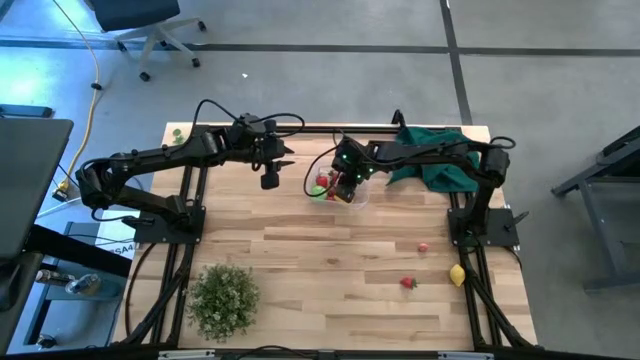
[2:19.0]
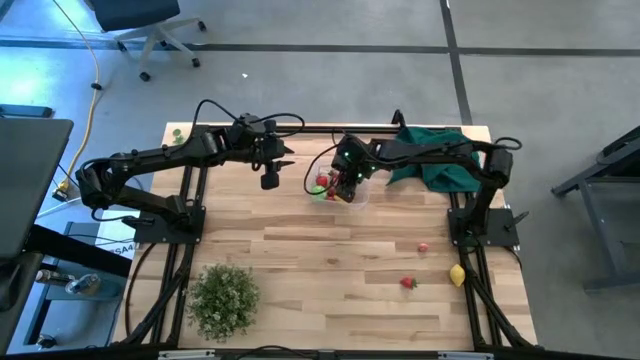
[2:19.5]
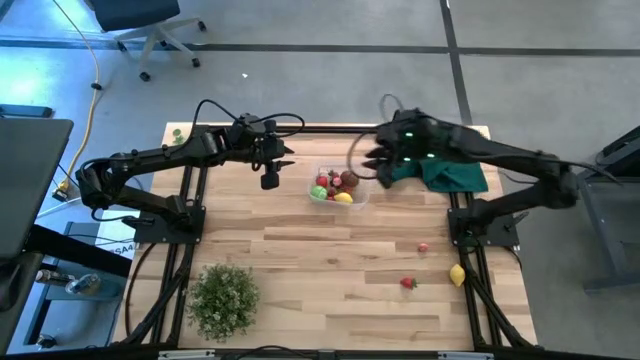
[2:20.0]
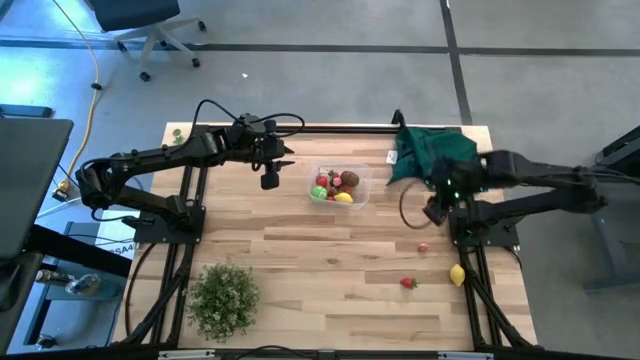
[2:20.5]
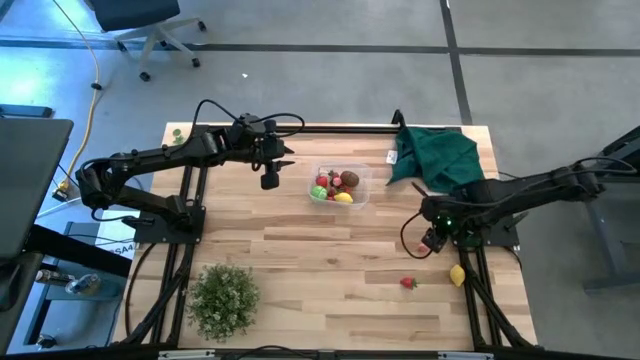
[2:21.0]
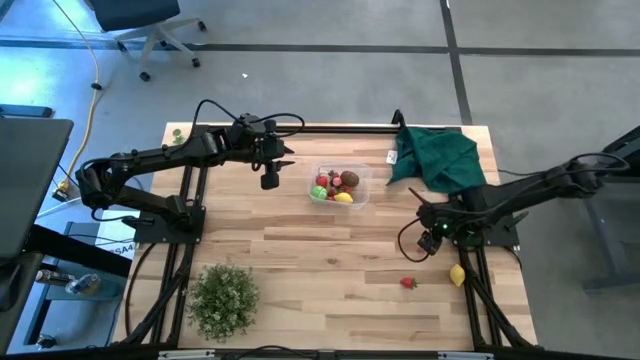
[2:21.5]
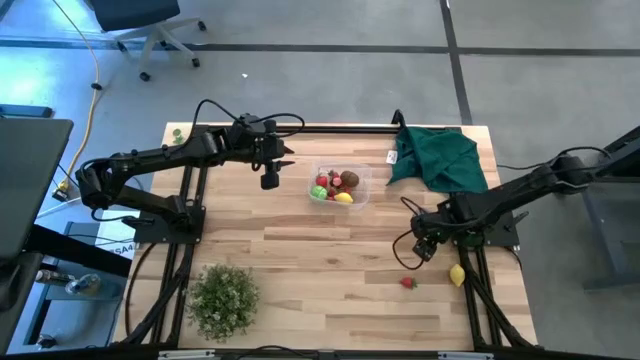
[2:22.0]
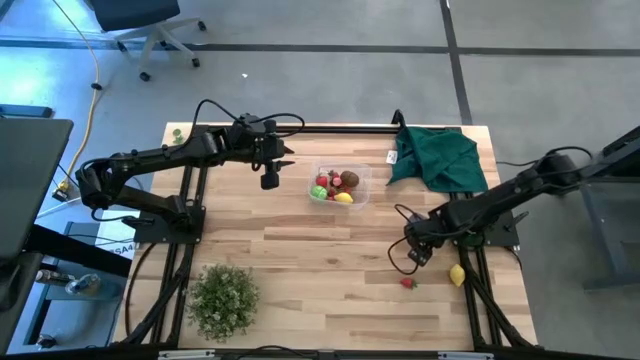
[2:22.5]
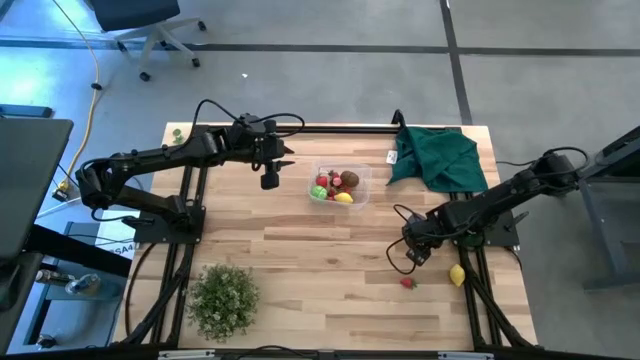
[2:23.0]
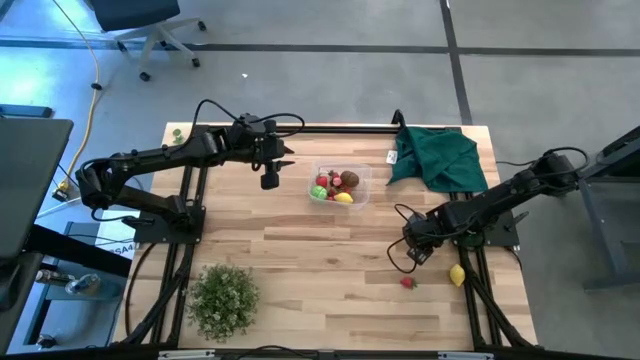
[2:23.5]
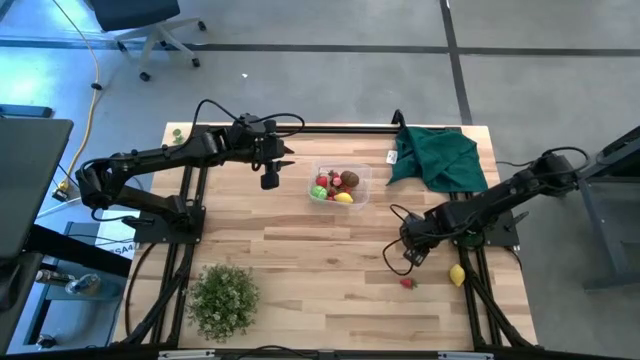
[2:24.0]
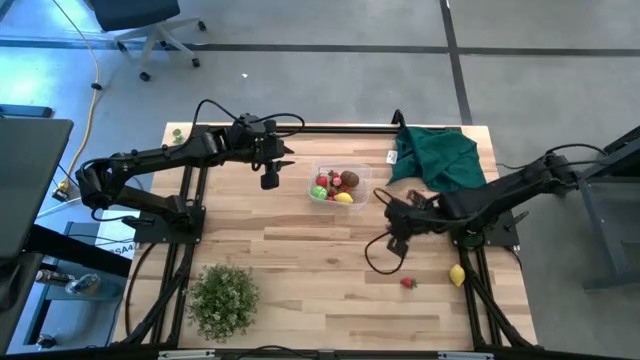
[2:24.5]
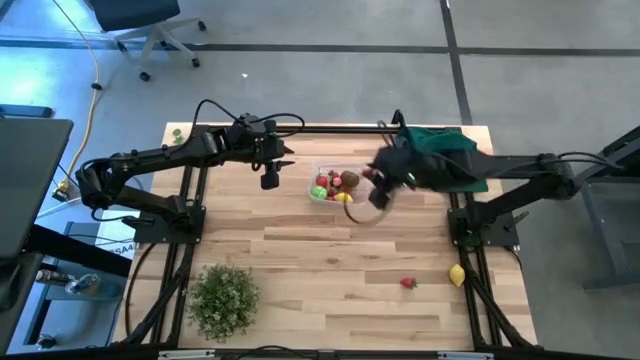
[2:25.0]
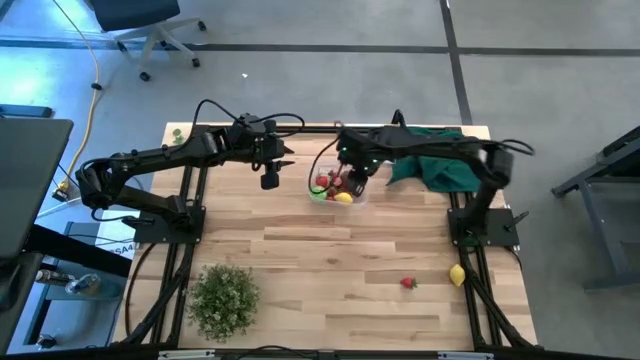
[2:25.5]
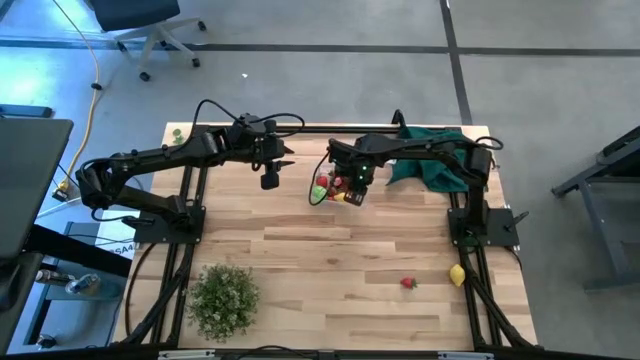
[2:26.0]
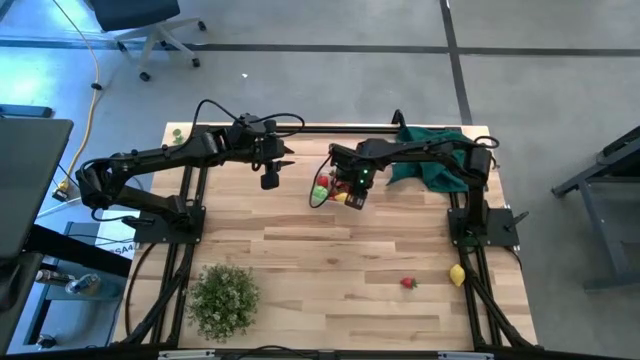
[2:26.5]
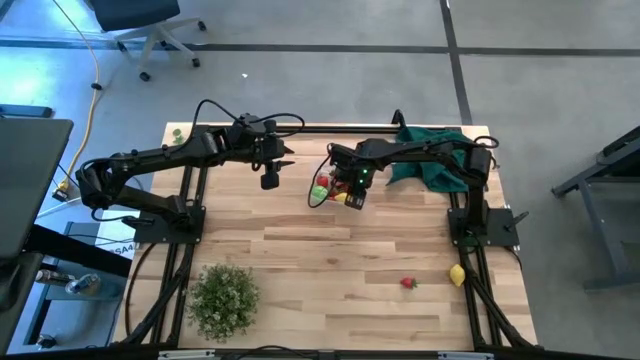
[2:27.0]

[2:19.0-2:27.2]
Task: Pick and placing Produce into tupperware
Put the pink peach into the transparent bin

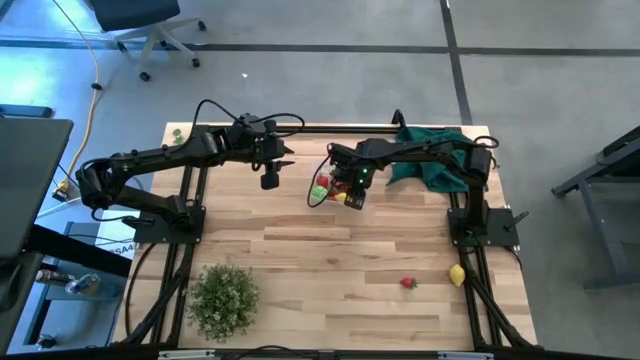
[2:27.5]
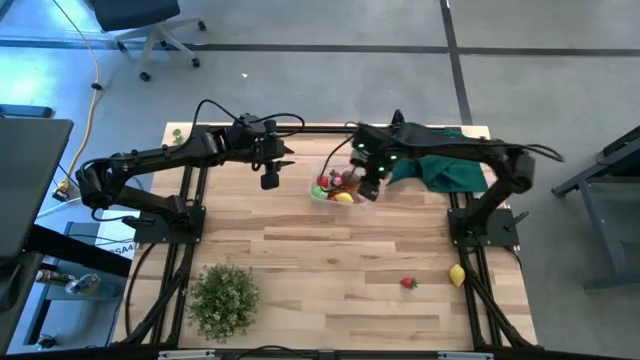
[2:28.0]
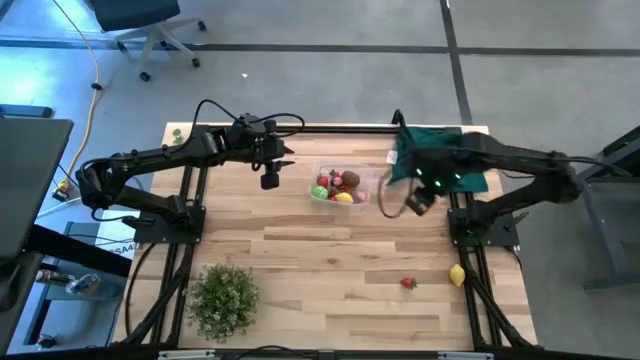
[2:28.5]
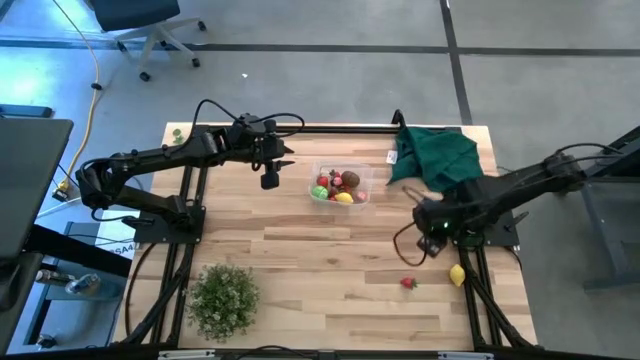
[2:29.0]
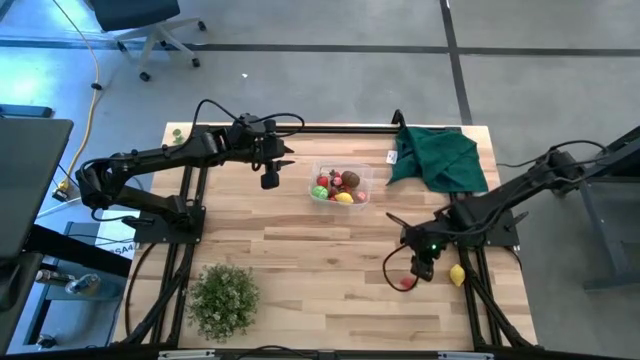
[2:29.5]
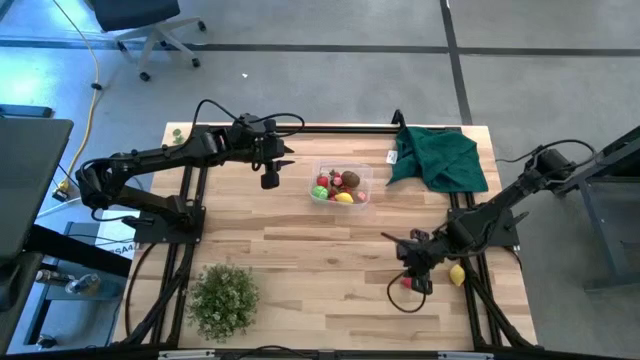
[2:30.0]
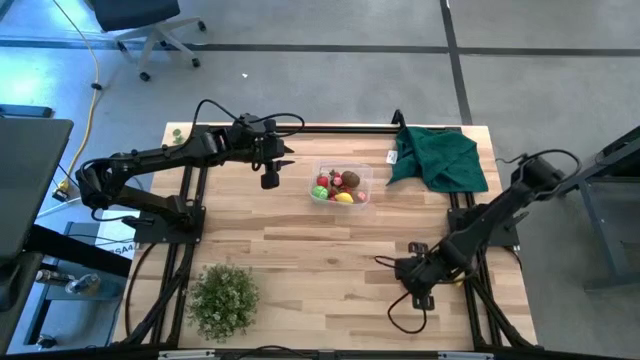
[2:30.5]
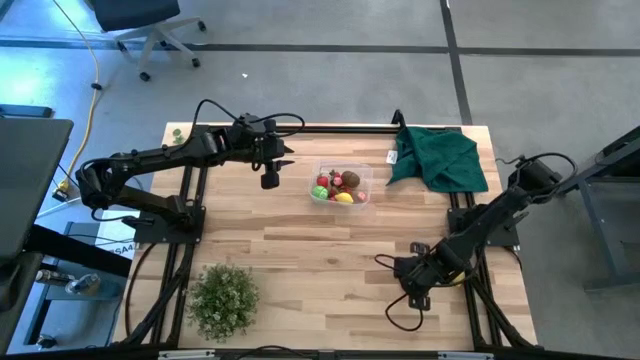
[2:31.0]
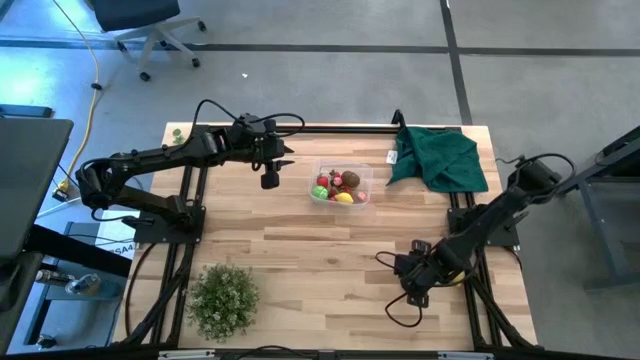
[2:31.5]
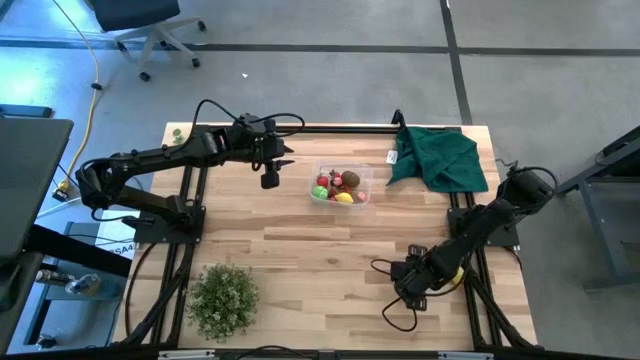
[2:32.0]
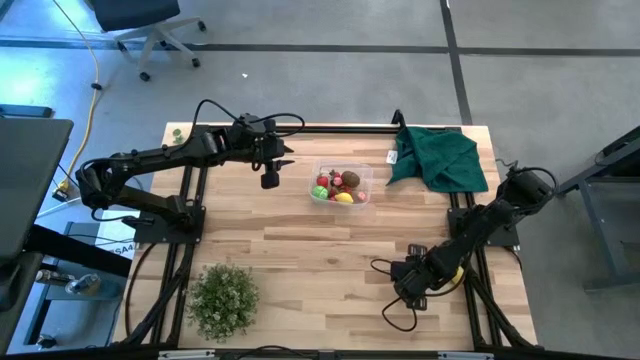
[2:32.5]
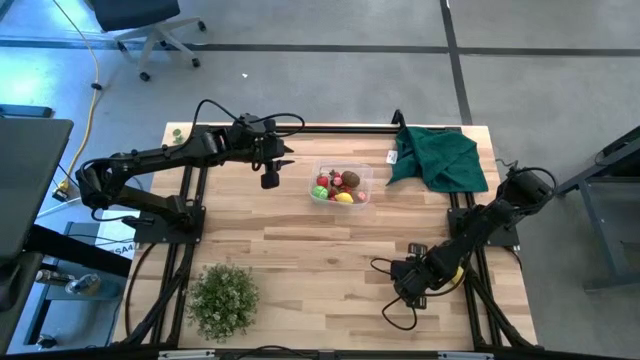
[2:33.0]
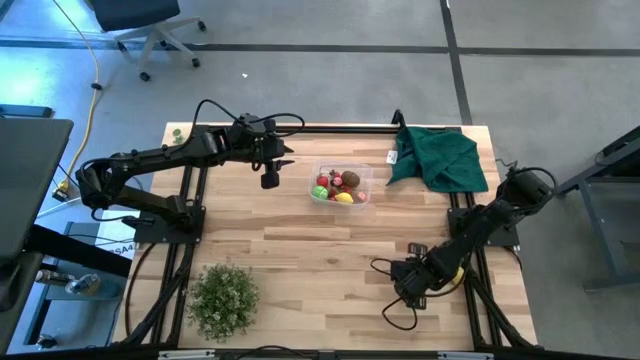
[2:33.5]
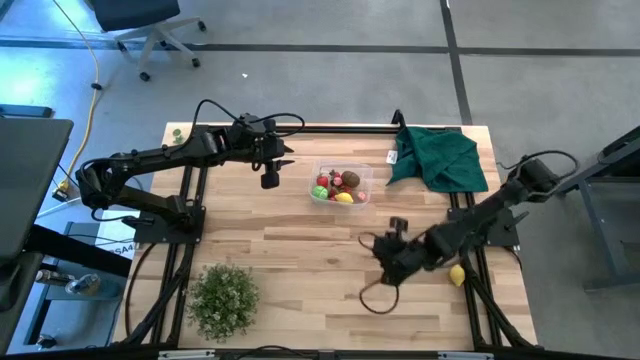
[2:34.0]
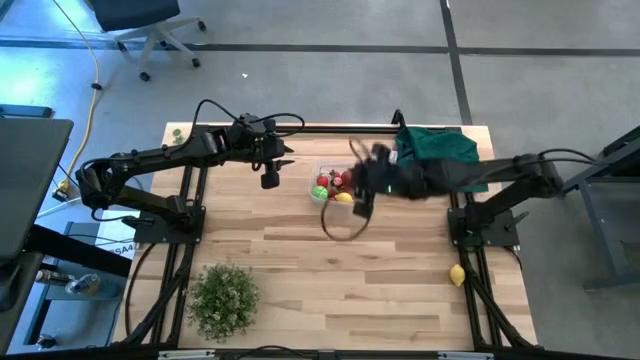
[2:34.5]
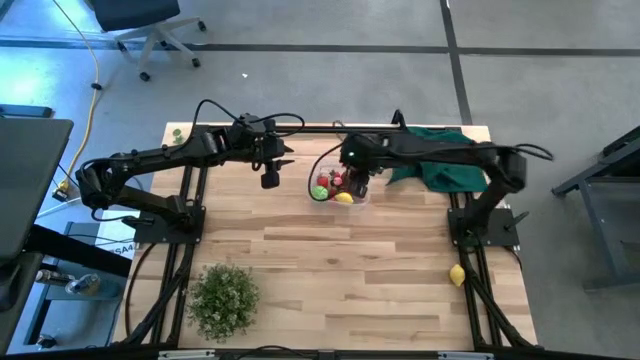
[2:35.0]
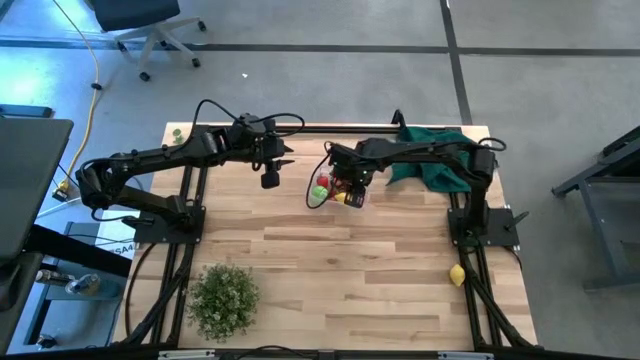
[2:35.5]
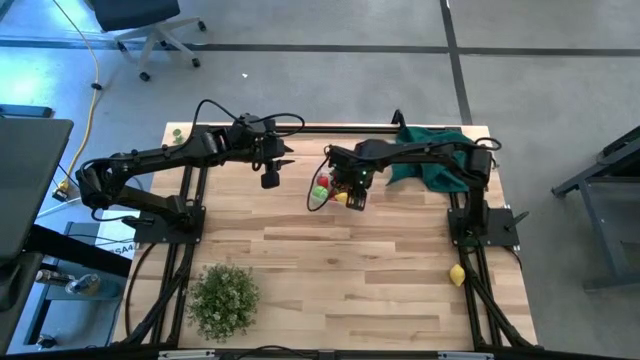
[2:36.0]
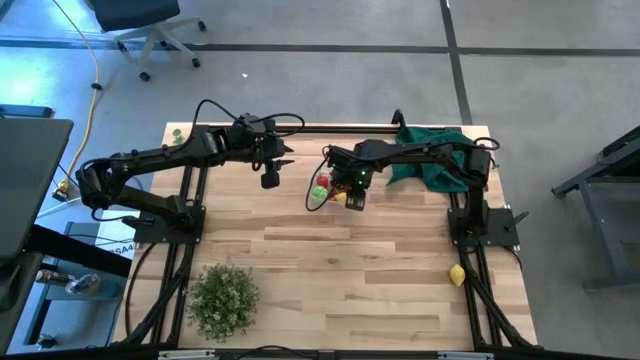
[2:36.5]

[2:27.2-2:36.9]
Put the red strawberry into the transparent bin

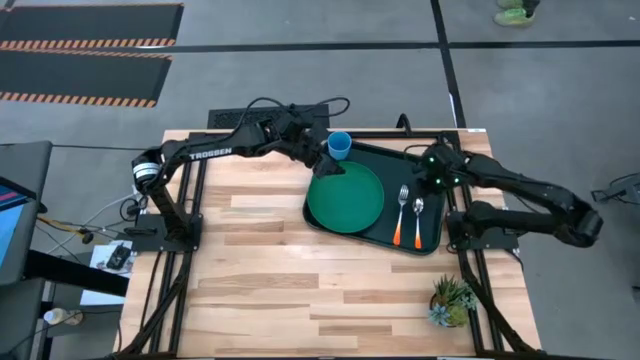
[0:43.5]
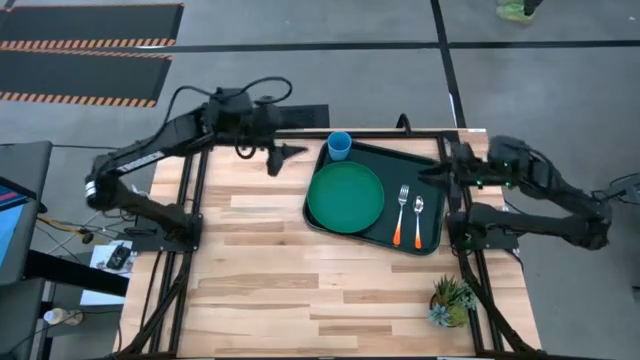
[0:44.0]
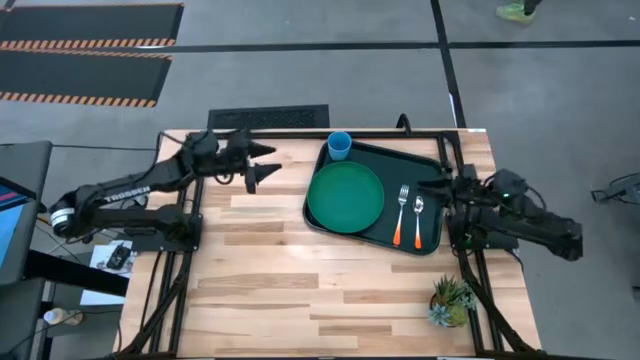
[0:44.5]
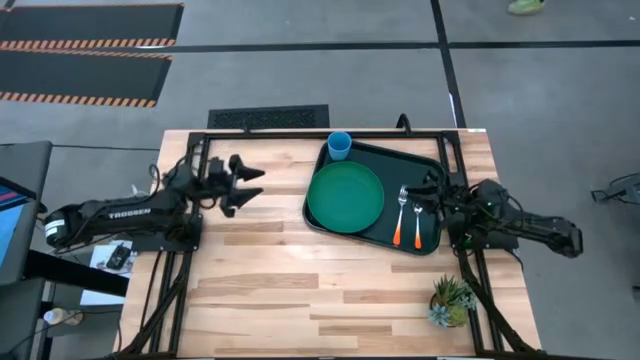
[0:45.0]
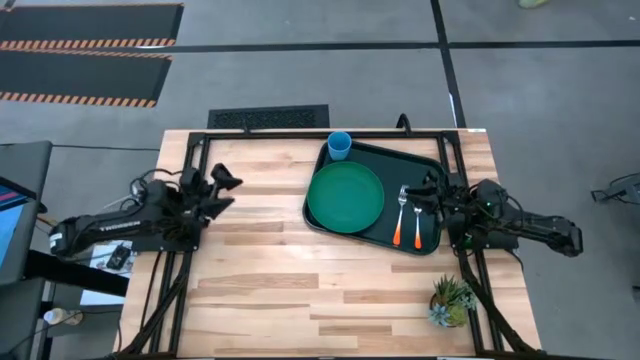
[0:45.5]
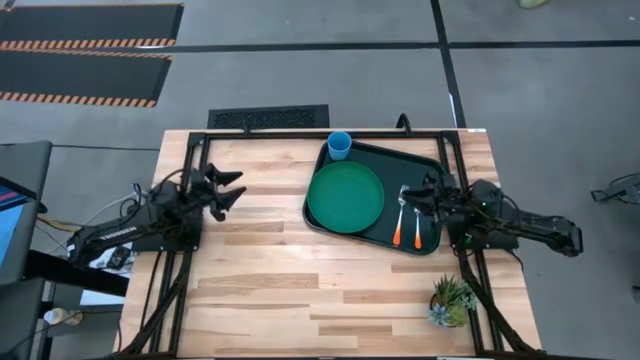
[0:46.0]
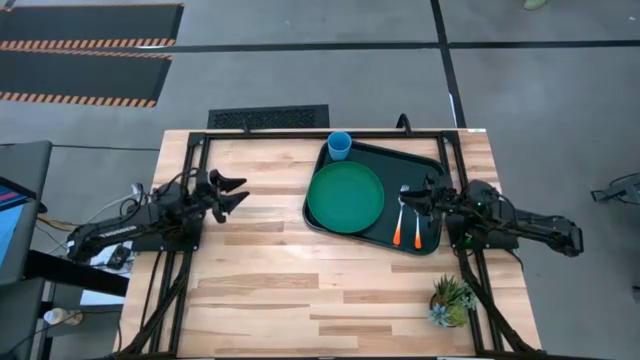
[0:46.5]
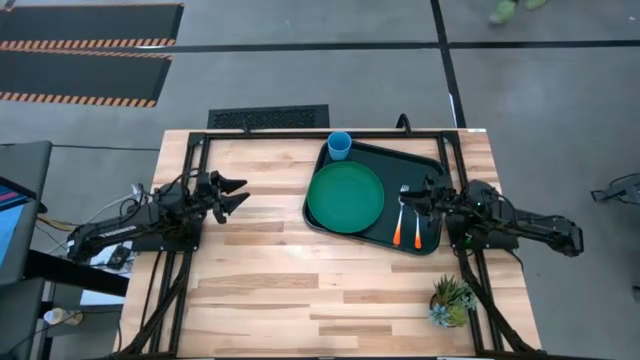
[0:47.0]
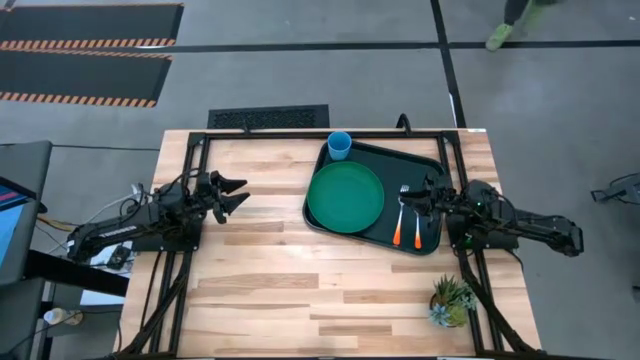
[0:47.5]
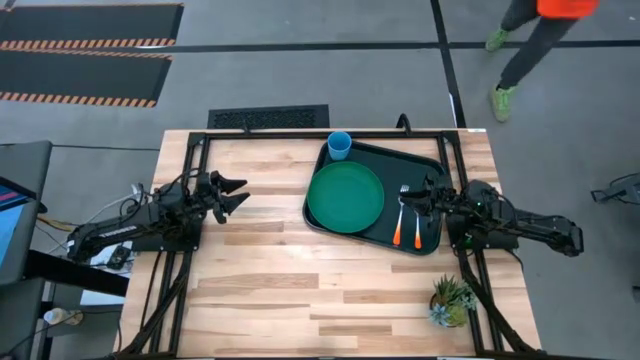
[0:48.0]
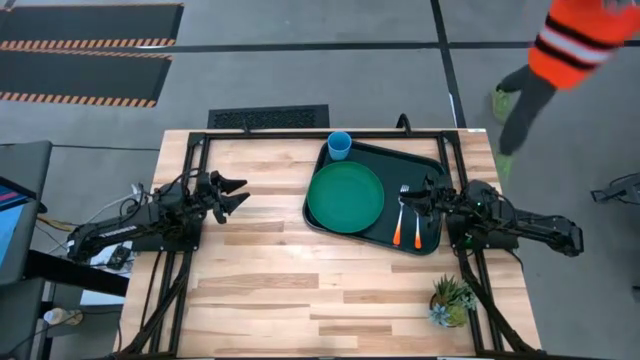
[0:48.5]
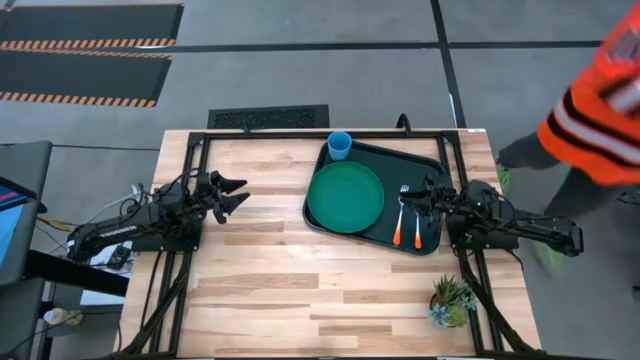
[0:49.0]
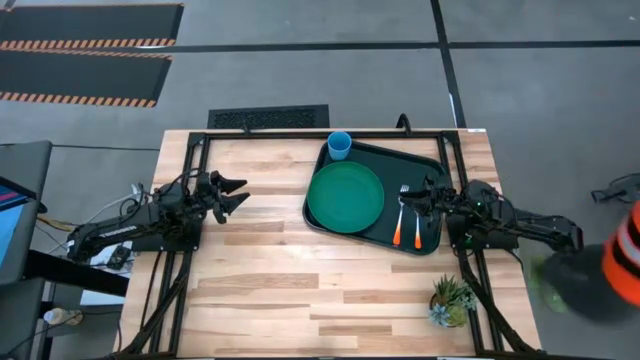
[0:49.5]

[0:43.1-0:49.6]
Task: Pick and place plate/cup/fork/spoon on tray
Return to Home Position
